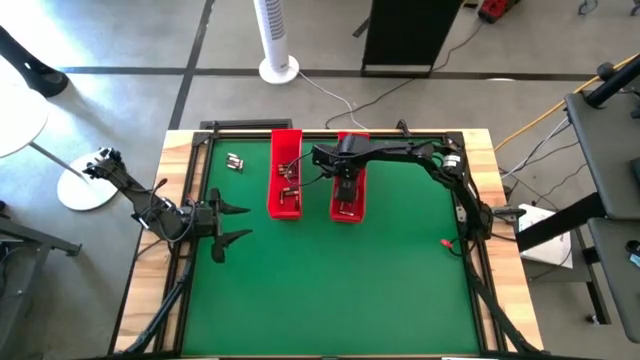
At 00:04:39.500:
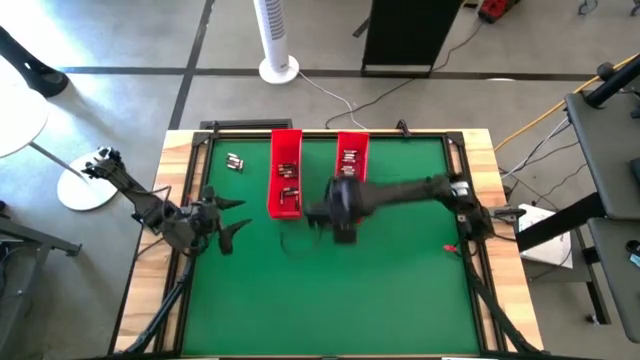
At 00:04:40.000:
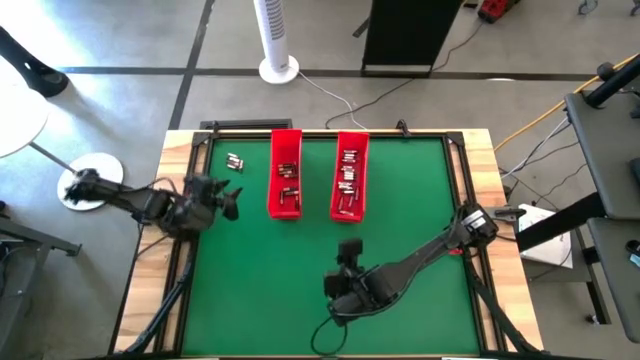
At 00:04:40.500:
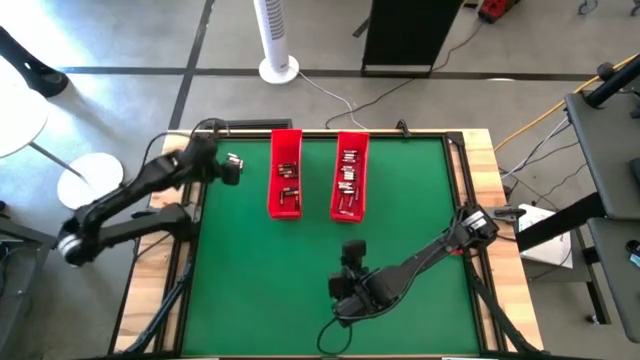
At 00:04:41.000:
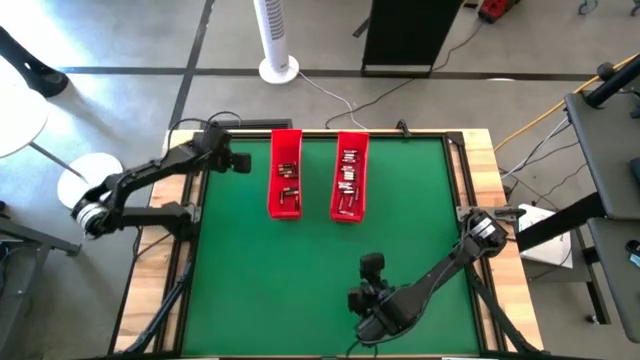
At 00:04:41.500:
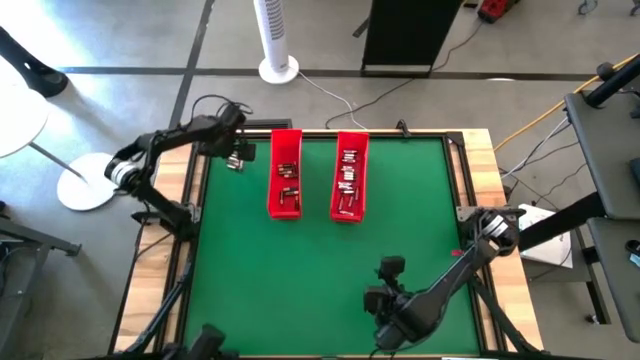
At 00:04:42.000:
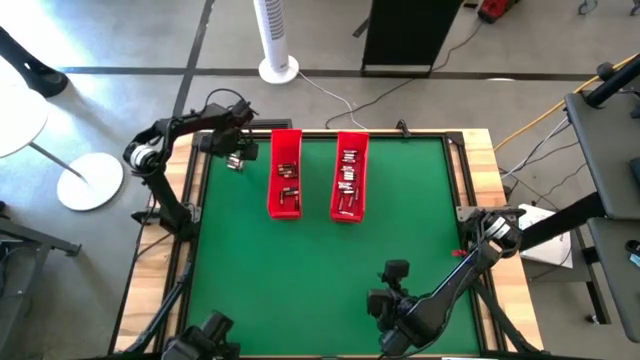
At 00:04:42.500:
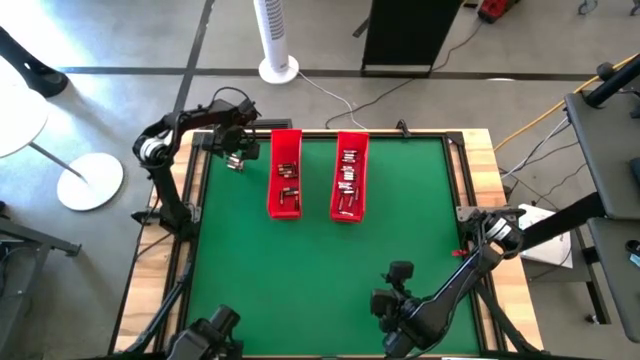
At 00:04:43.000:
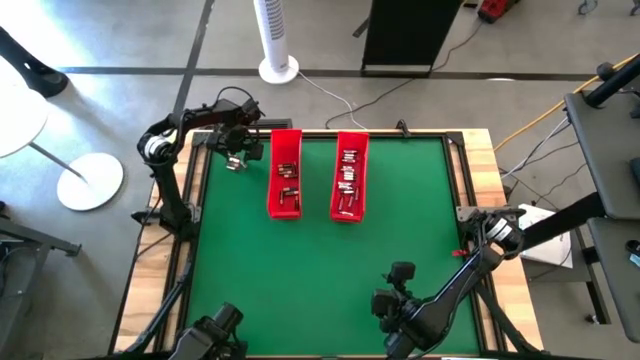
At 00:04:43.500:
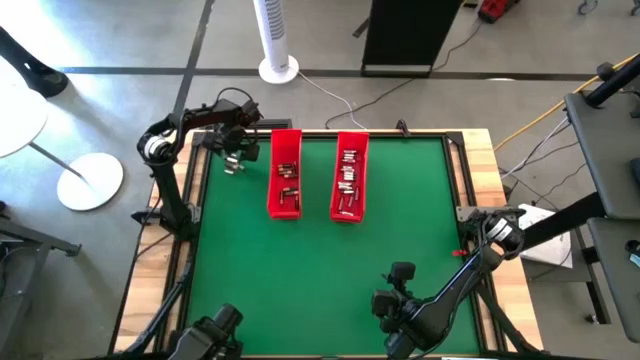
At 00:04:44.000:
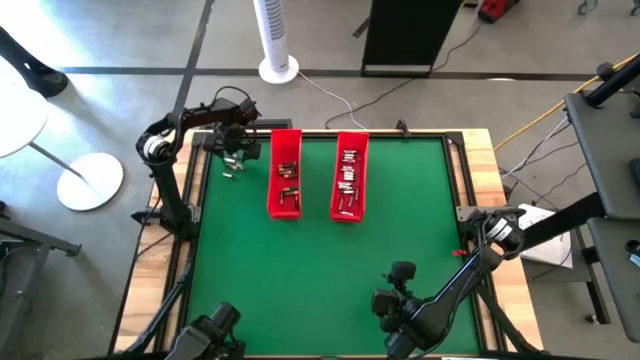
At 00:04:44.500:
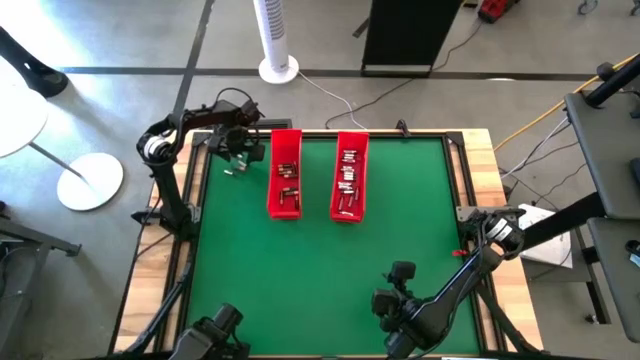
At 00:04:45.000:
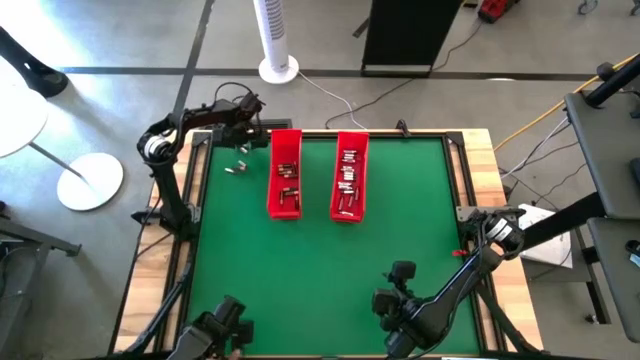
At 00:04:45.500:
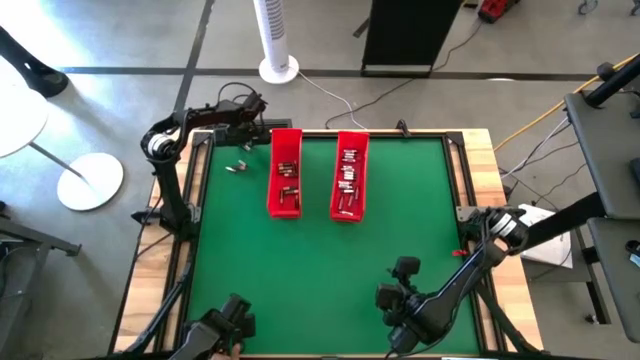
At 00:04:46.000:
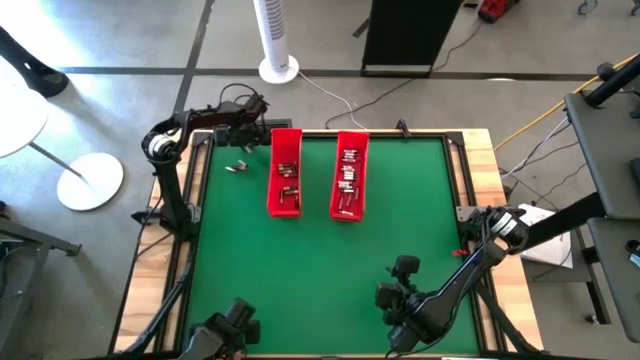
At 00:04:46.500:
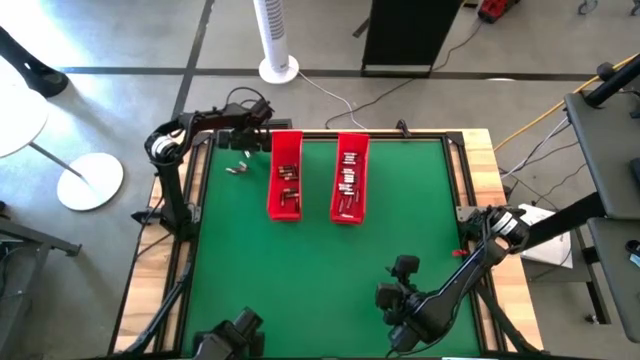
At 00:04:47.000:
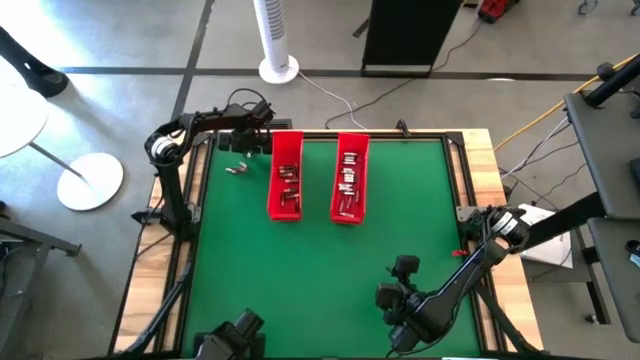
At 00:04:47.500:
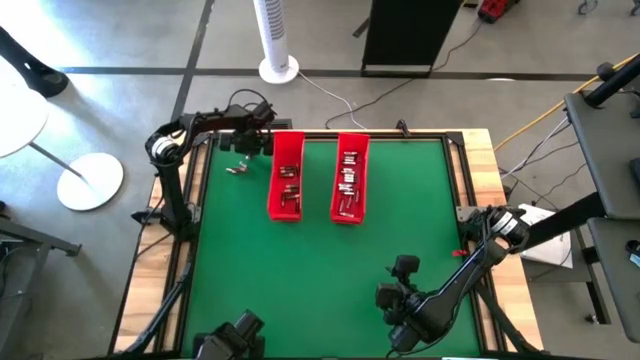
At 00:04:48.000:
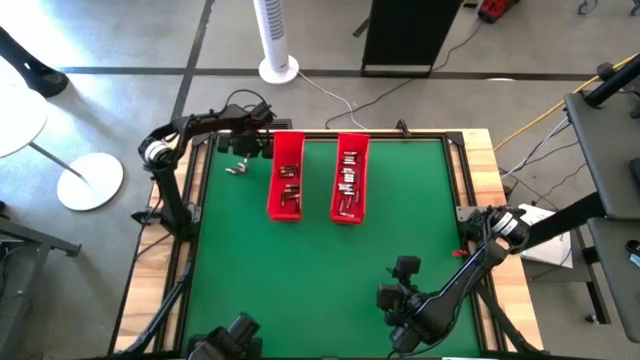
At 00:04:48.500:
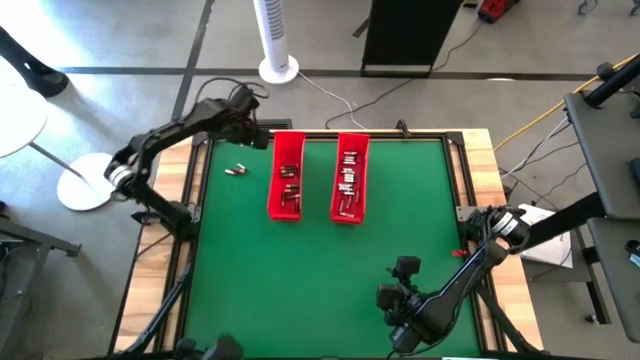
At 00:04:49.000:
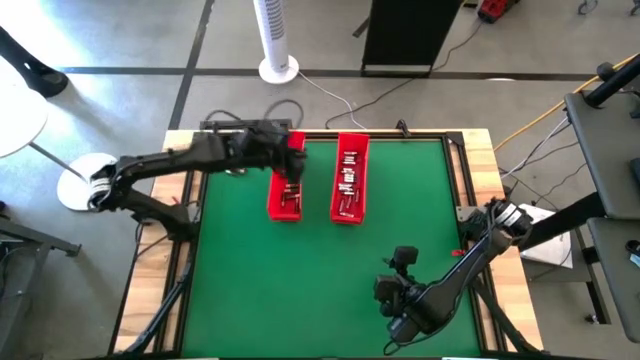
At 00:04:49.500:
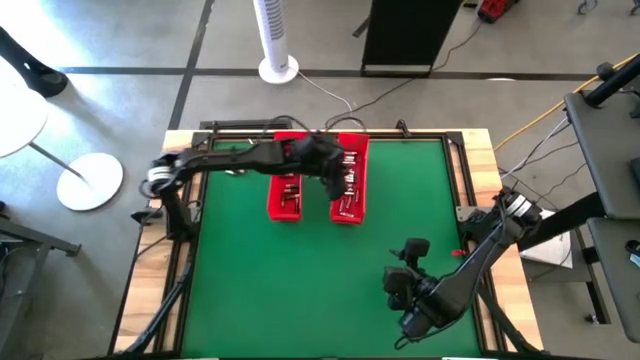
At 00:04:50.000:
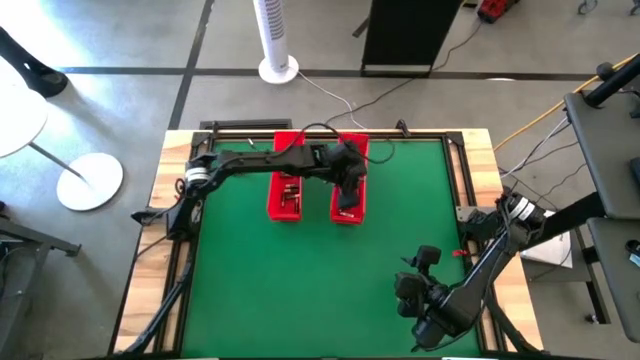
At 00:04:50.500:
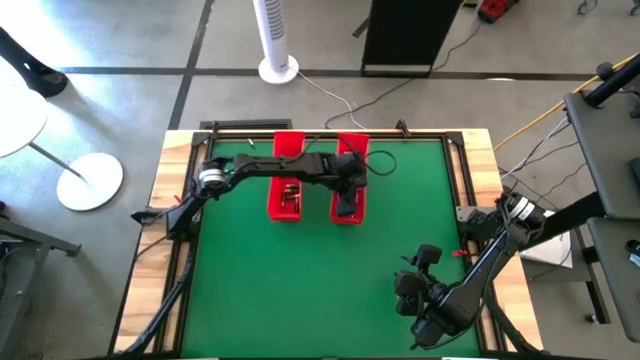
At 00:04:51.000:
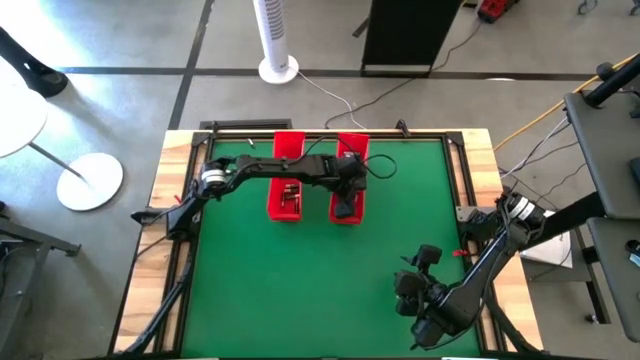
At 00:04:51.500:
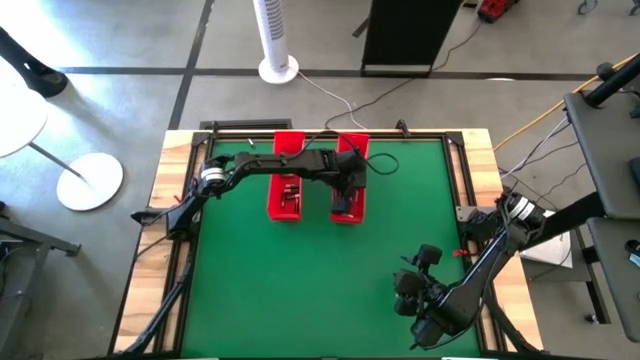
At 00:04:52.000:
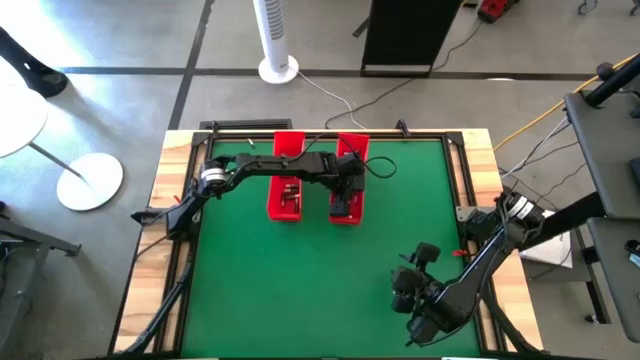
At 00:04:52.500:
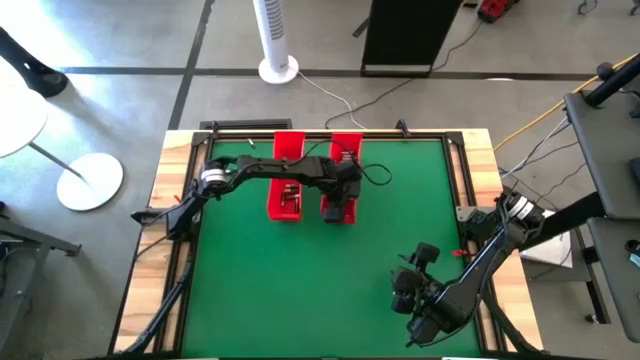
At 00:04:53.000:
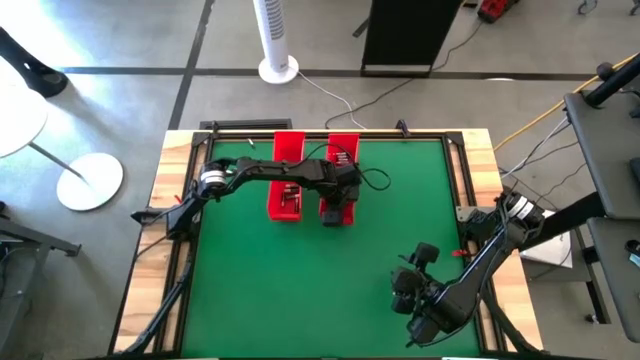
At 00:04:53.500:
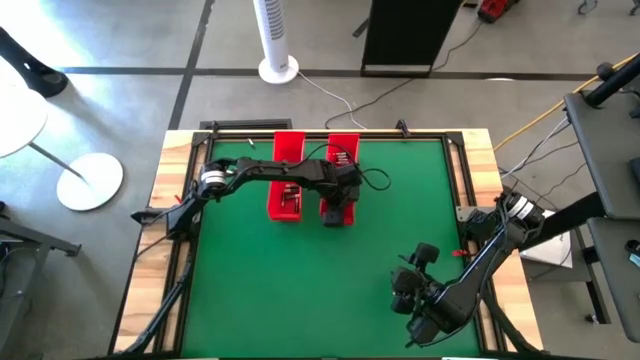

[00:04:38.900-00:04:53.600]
Task: Sort batteries
Put the silver battery into the right red bin

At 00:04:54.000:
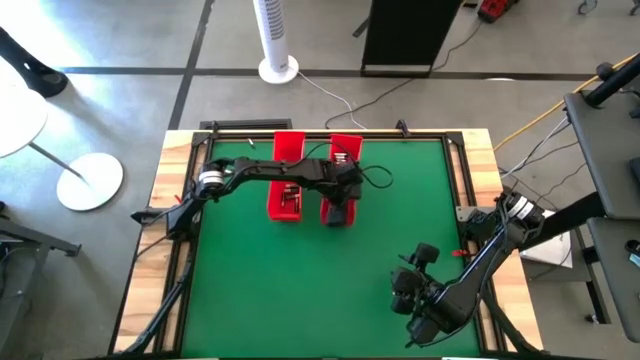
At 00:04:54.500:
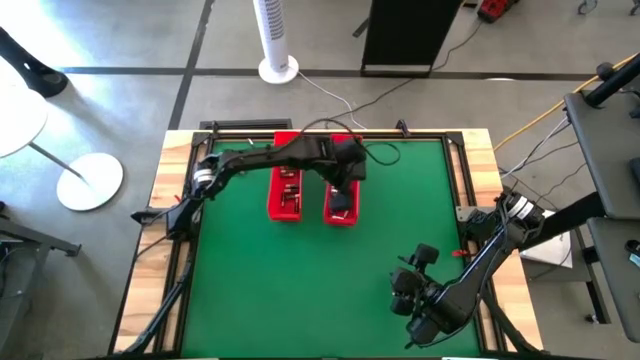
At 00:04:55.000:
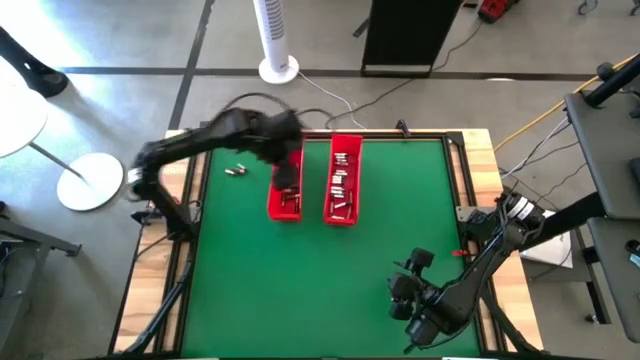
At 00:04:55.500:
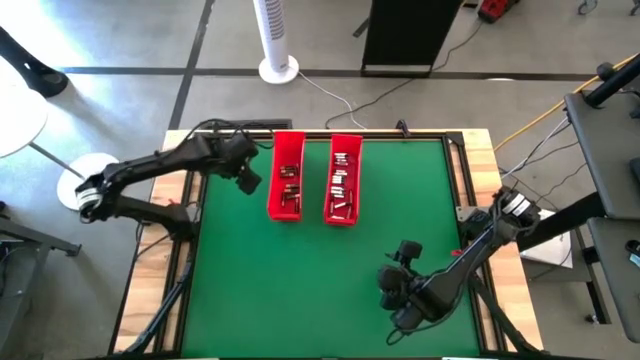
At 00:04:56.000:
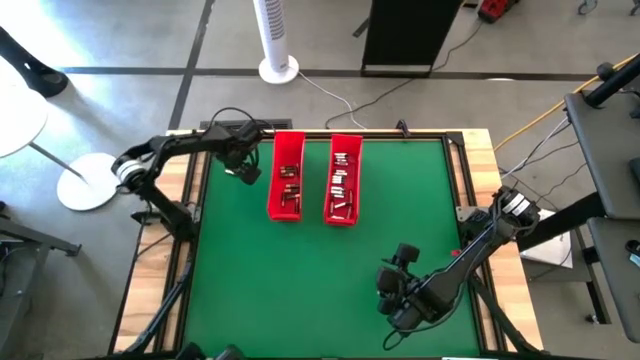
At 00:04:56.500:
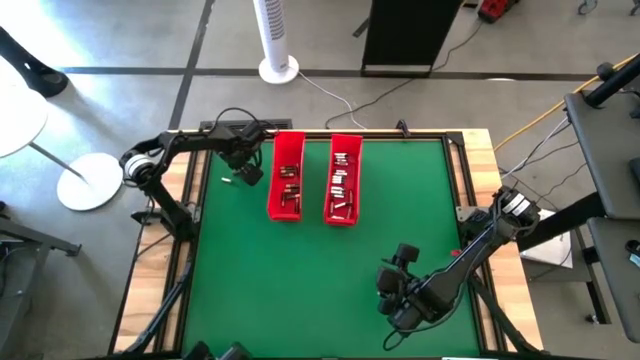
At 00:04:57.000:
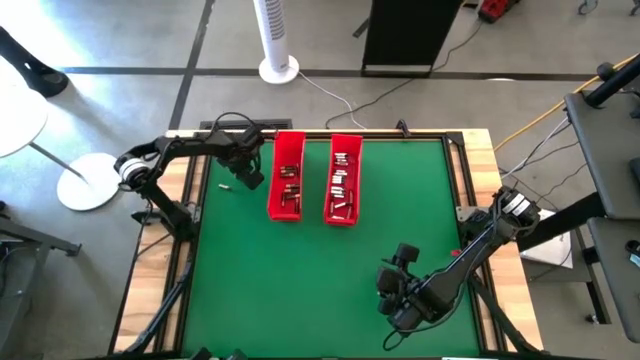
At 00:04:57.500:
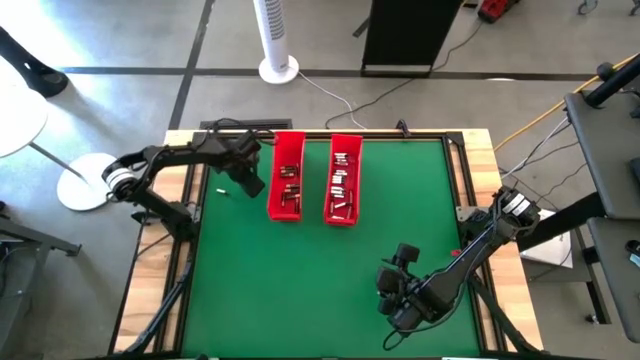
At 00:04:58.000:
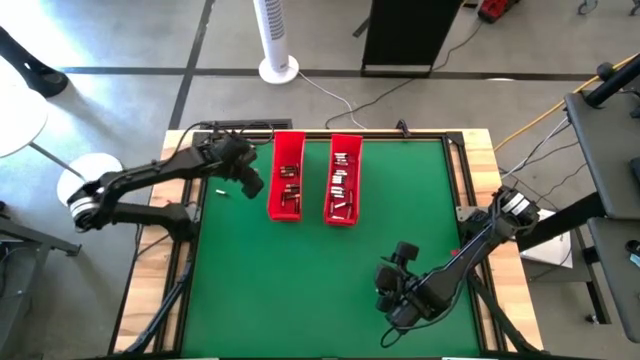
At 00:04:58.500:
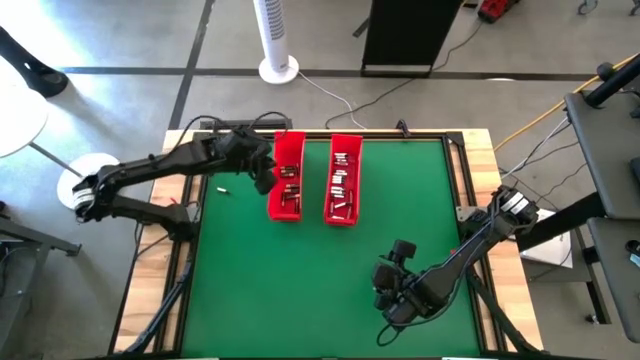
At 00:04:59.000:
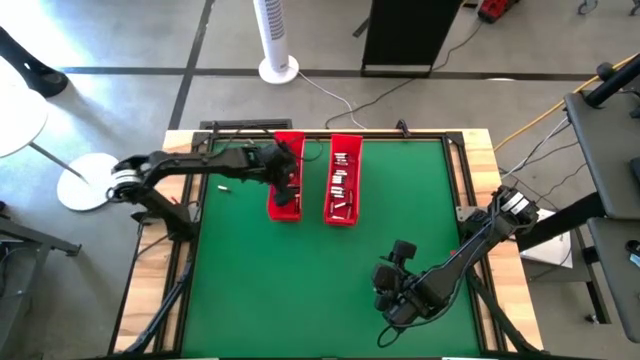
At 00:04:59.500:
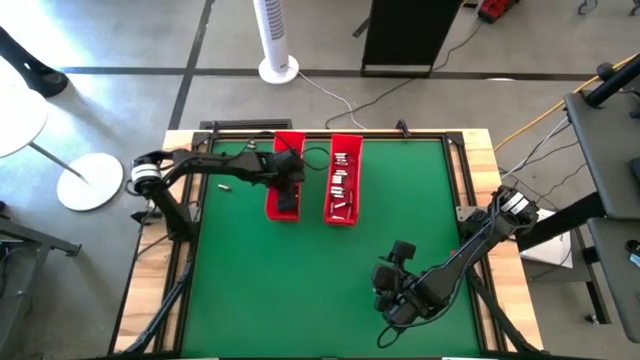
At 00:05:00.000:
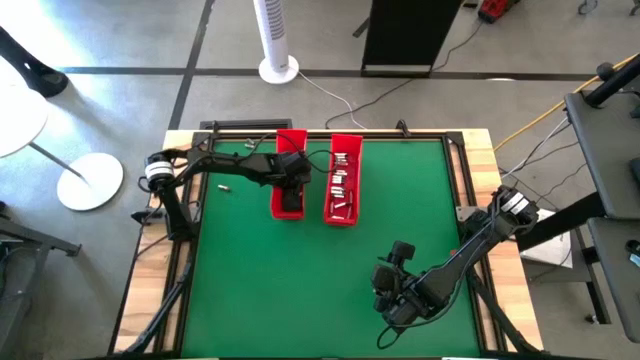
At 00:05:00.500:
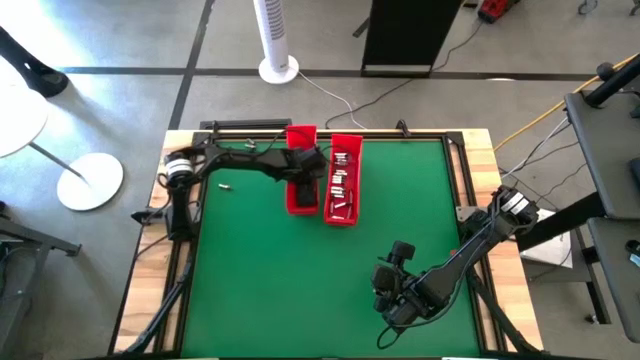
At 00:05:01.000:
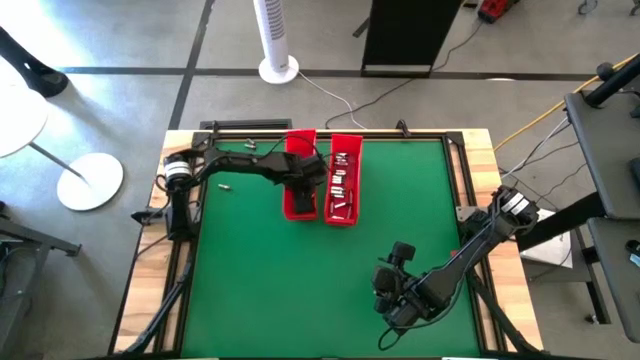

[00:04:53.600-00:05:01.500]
Put the black battery into the left red bin
